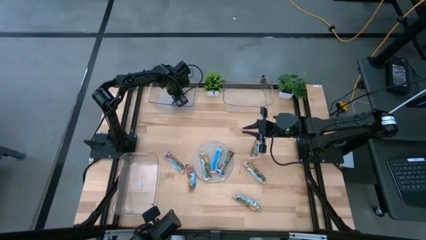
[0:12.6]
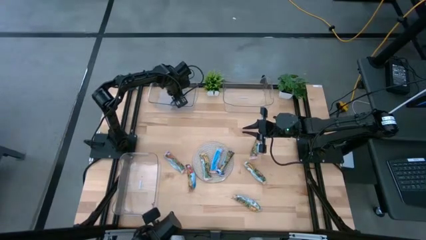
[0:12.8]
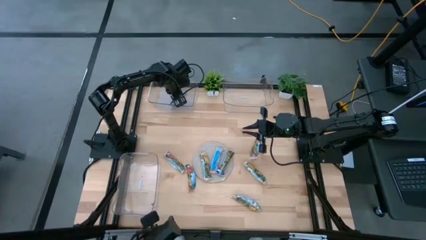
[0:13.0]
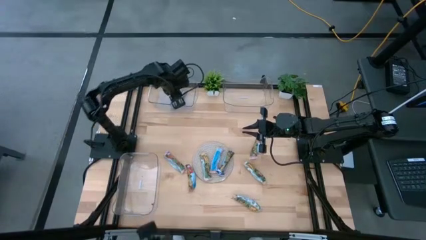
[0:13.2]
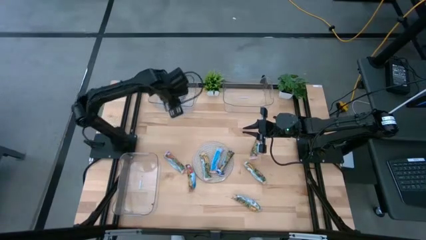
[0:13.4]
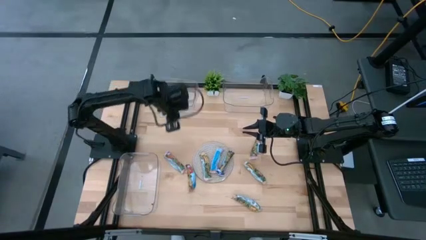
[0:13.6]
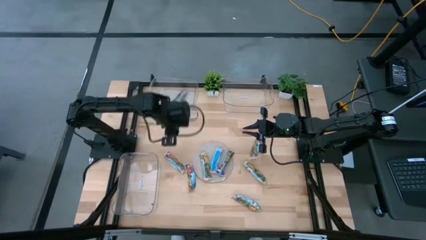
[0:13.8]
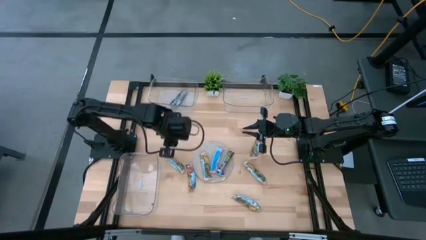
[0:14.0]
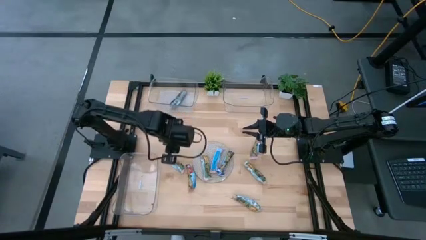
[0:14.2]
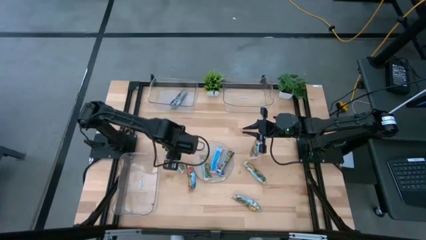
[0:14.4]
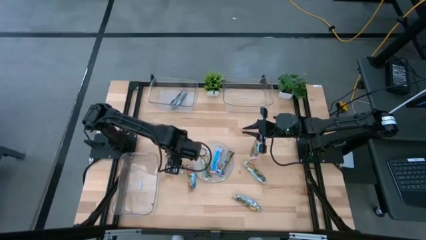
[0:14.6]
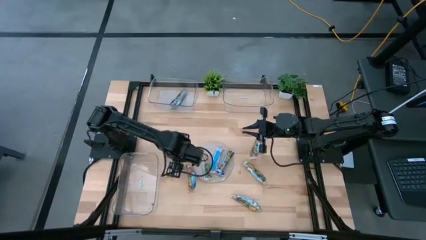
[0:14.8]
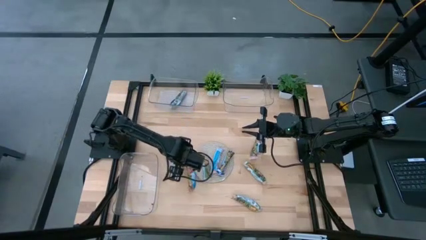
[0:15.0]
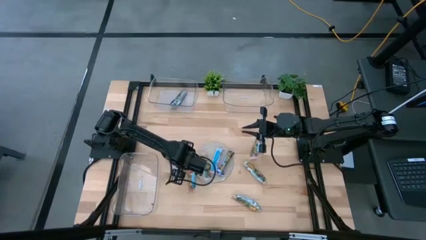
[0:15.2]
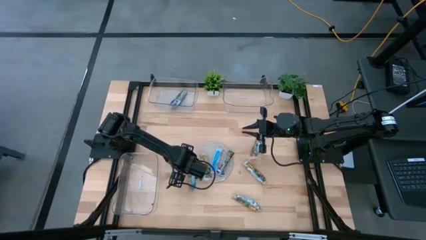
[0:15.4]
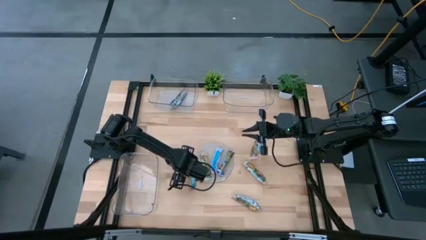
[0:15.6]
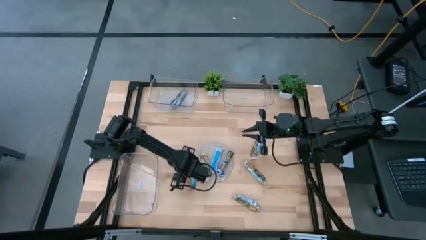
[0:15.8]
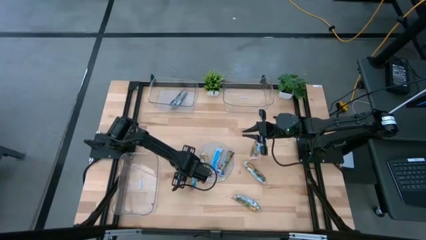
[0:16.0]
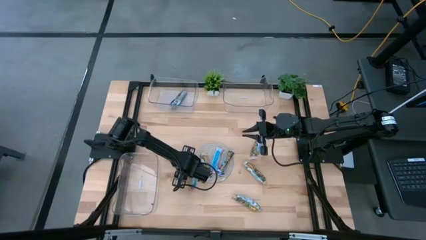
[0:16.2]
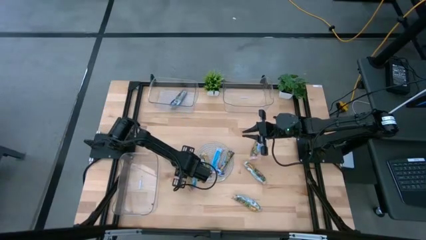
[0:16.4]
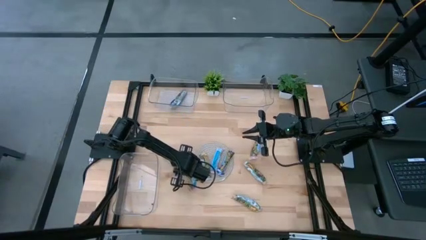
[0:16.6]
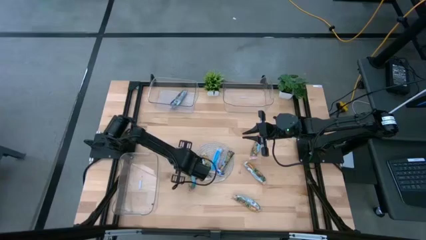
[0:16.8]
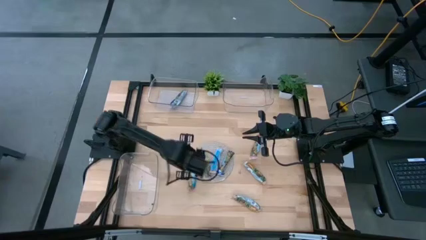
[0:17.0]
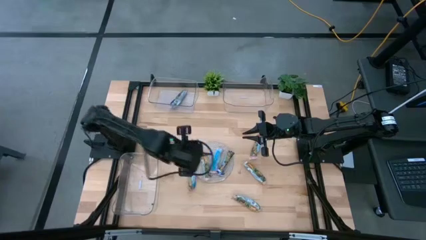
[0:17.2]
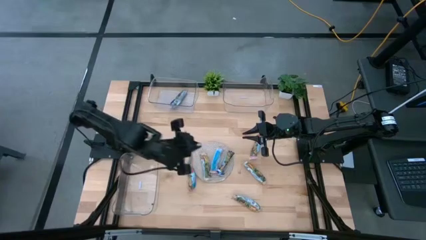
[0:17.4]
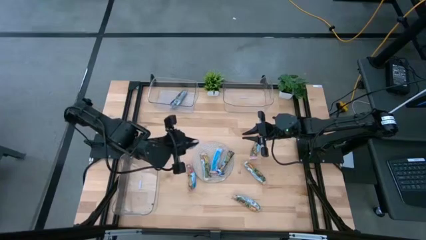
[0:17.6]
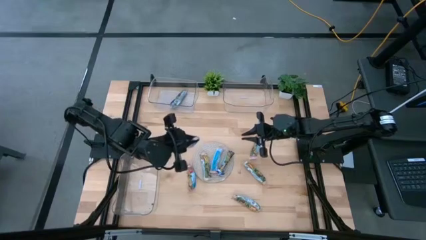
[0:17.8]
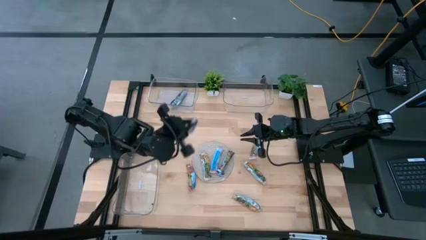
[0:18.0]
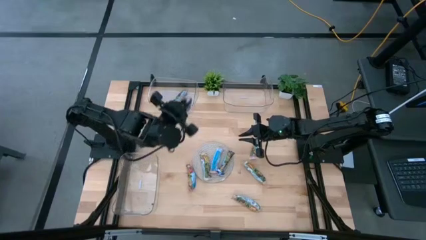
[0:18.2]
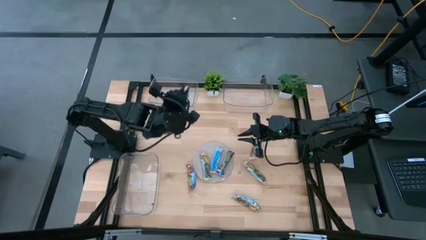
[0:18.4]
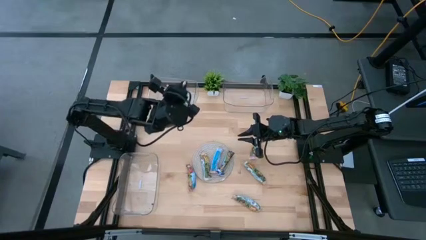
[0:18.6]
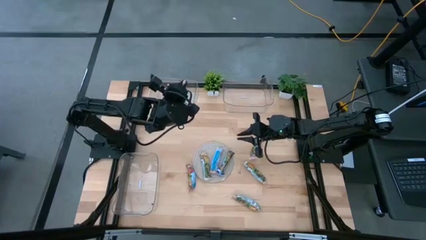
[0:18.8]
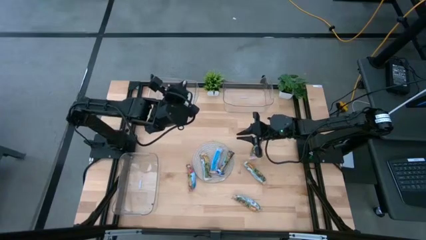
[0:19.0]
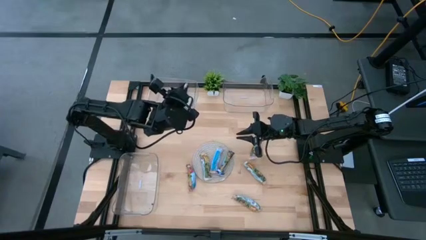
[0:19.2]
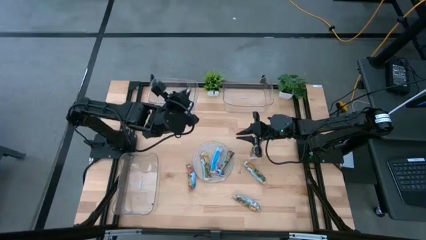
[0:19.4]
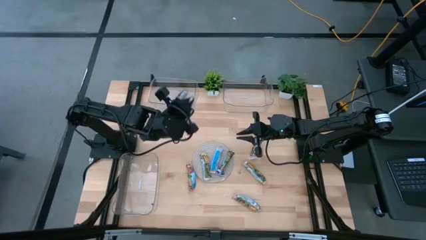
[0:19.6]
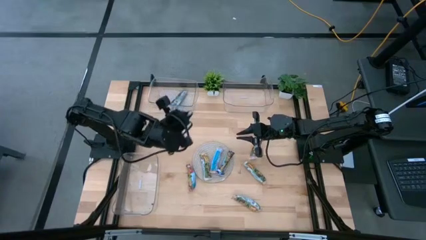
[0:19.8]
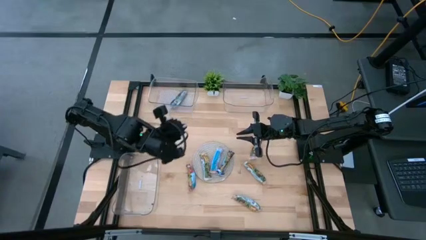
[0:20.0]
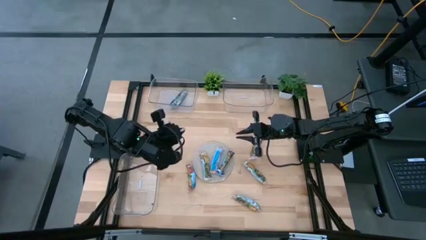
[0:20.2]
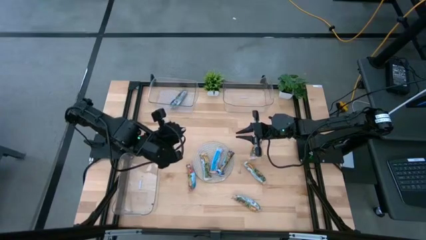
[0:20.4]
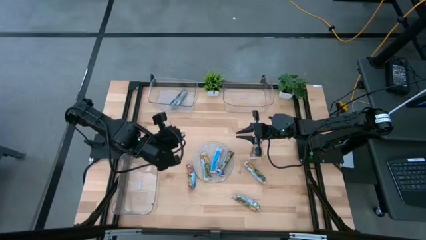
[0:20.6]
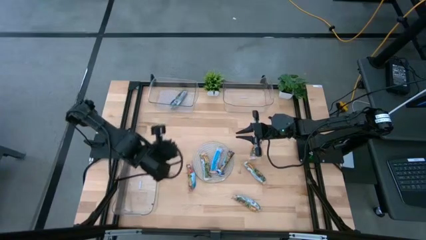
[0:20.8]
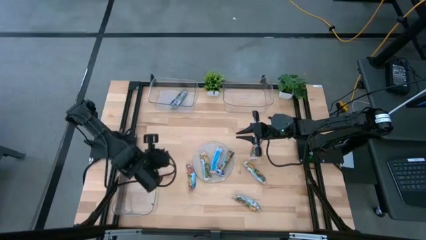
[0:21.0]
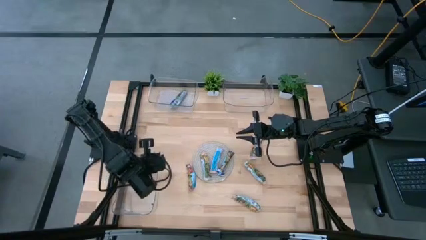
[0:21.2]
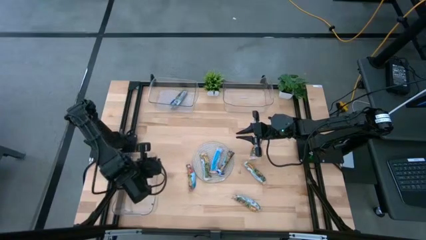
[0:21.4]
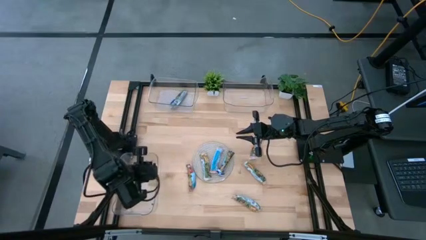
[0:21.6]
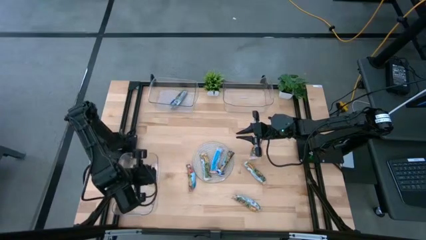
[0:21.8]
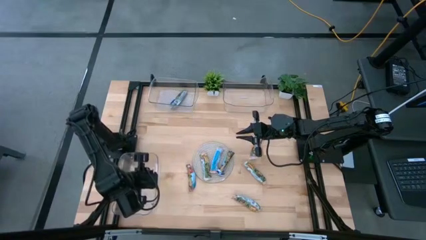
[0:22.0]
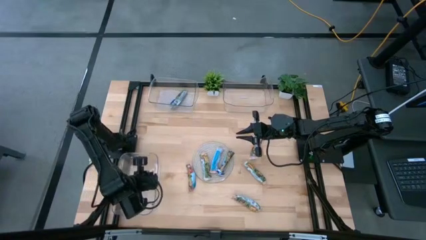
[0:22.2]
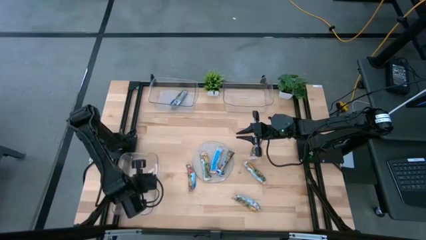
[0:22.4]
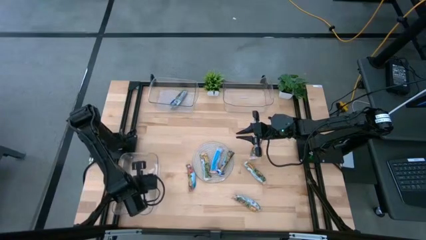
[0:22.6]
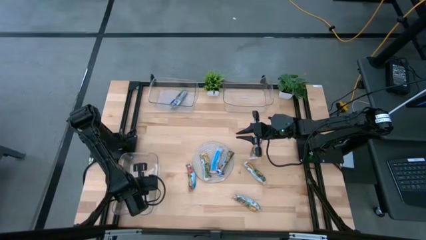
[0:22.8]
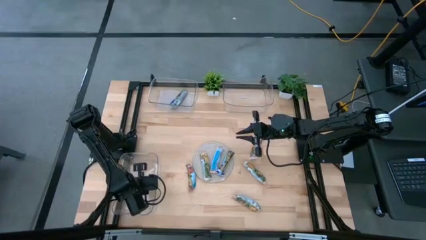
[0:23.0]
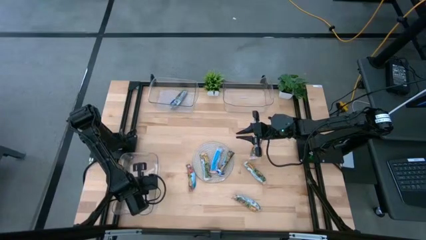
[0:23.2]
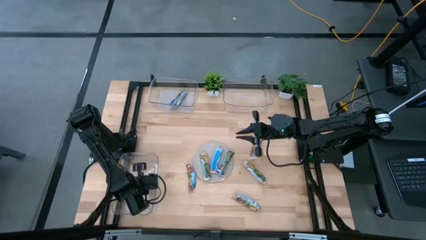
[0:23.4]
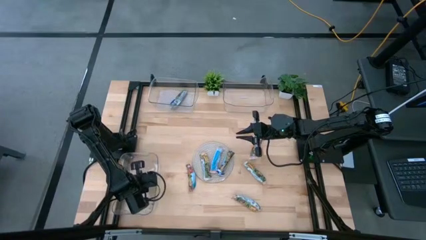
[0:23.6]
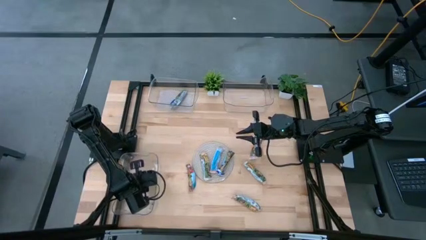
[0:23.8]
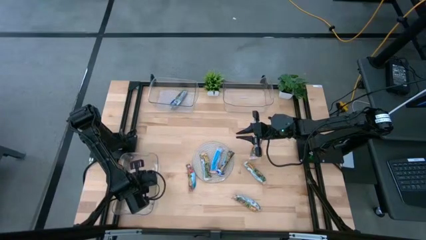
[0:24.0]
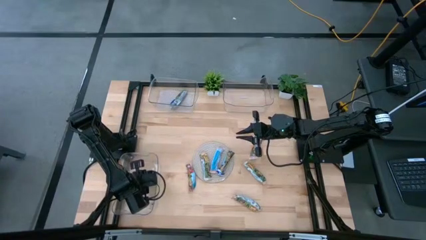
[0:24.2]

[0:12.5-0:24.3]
Task: Pick and place Granola Bars by type
Put the red granola bar into the bottom transparent bin
